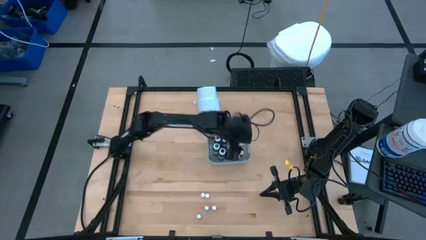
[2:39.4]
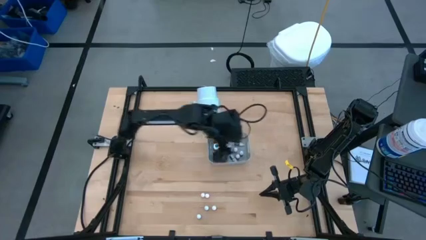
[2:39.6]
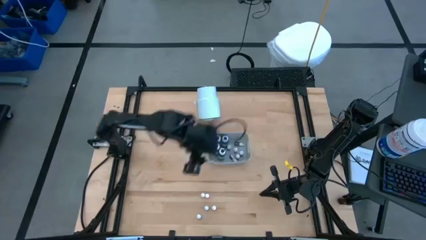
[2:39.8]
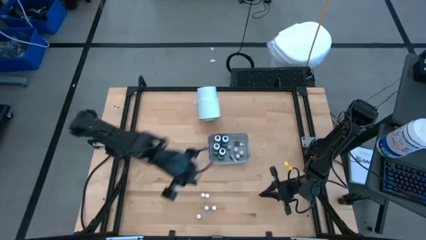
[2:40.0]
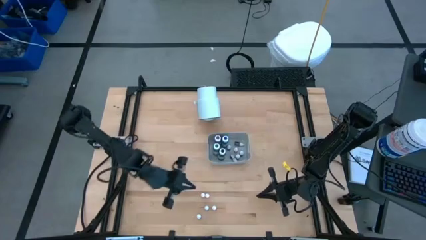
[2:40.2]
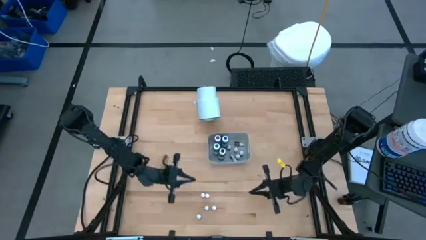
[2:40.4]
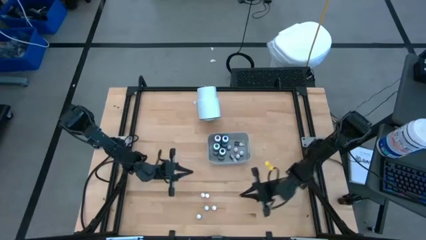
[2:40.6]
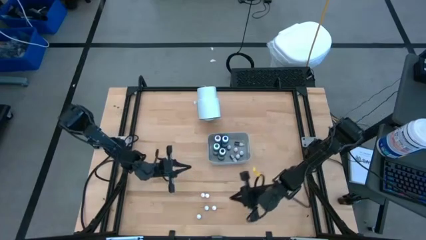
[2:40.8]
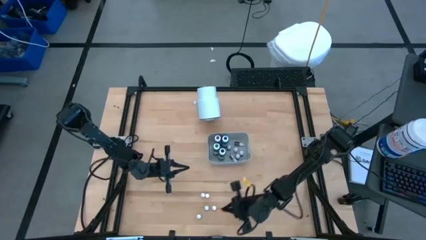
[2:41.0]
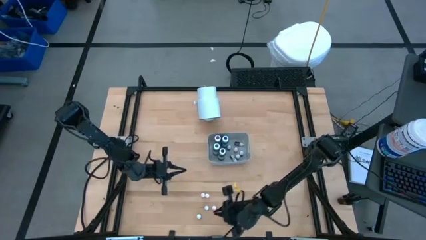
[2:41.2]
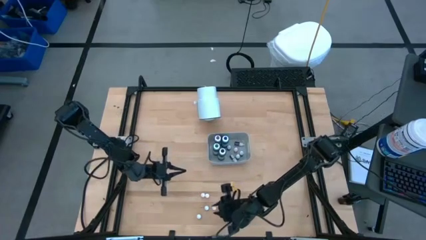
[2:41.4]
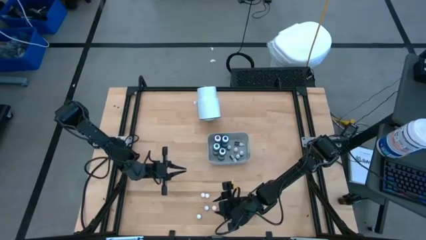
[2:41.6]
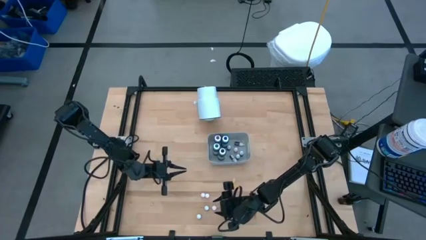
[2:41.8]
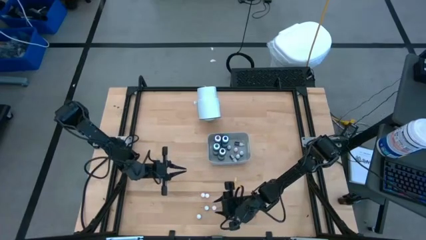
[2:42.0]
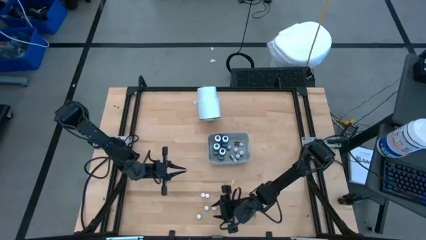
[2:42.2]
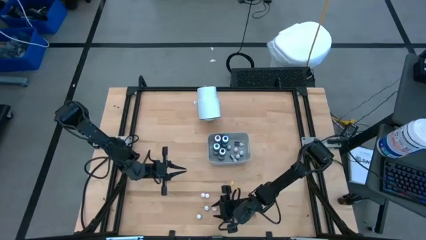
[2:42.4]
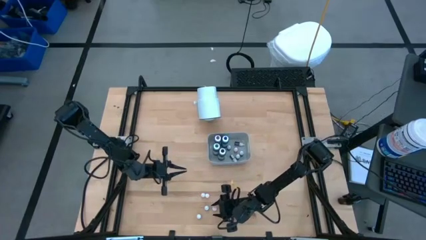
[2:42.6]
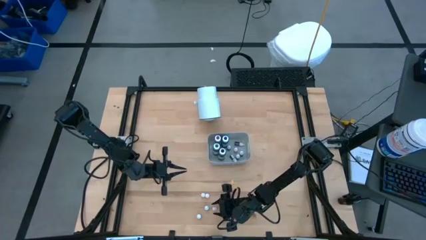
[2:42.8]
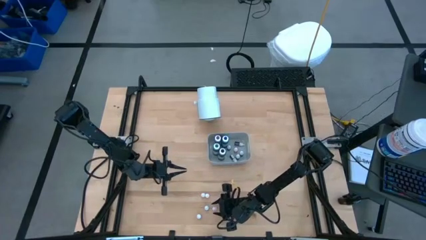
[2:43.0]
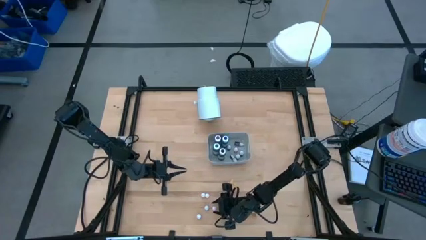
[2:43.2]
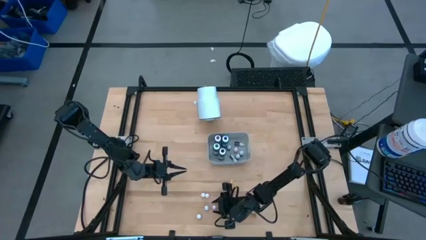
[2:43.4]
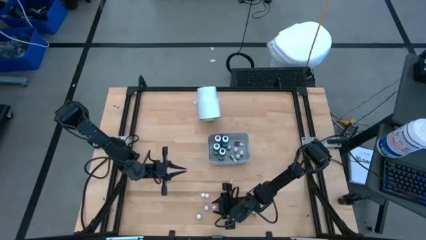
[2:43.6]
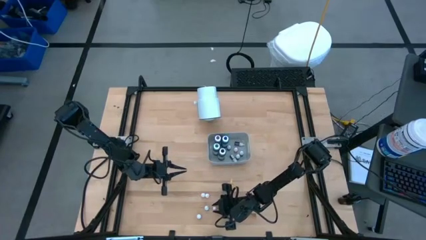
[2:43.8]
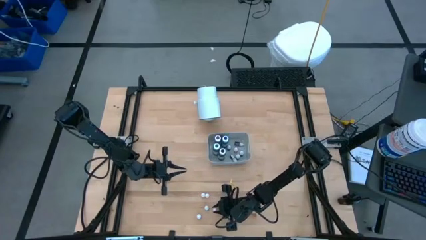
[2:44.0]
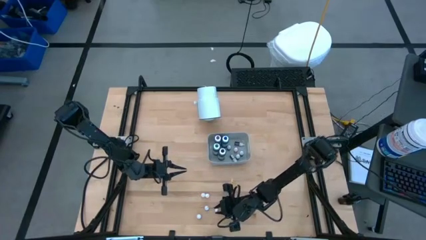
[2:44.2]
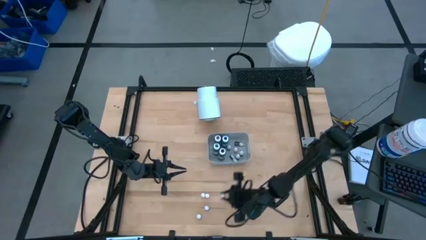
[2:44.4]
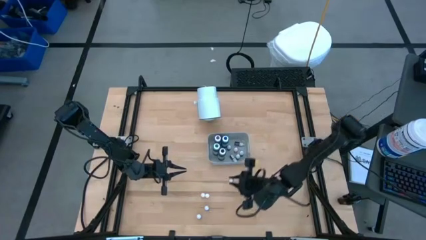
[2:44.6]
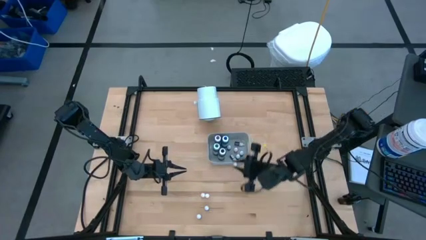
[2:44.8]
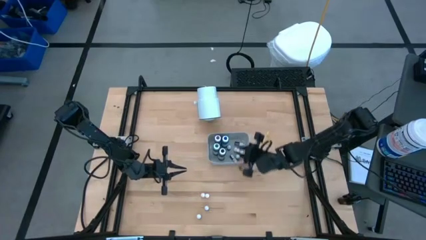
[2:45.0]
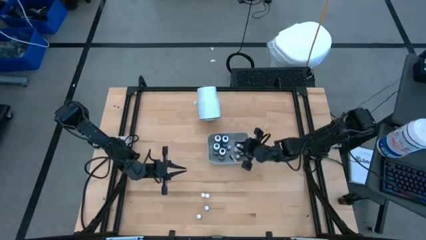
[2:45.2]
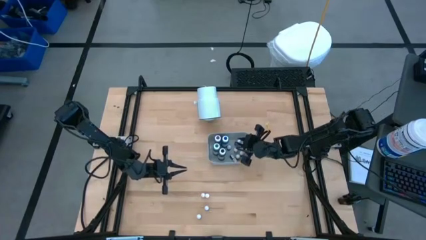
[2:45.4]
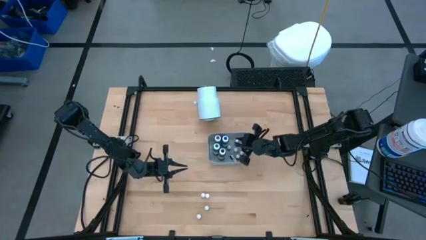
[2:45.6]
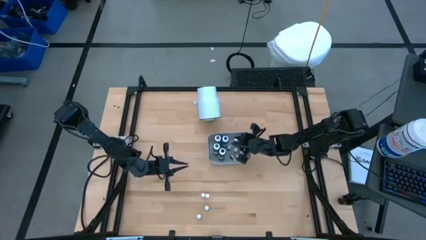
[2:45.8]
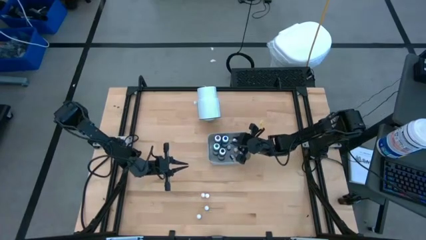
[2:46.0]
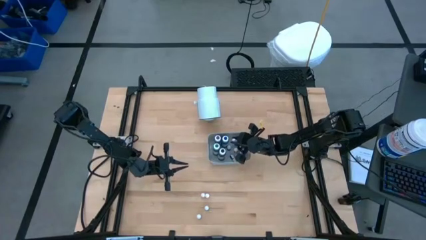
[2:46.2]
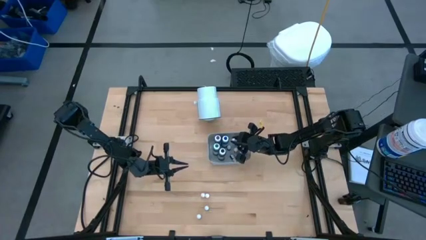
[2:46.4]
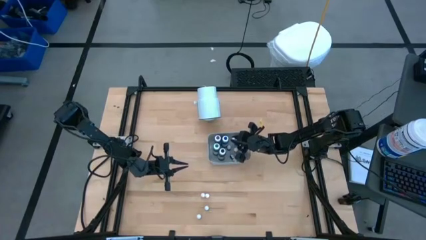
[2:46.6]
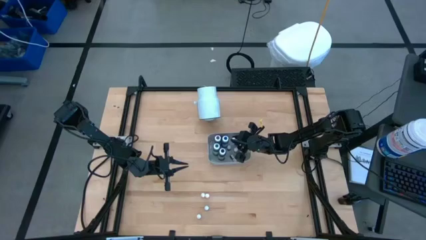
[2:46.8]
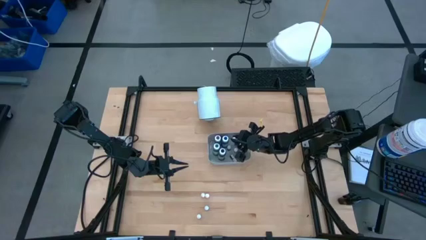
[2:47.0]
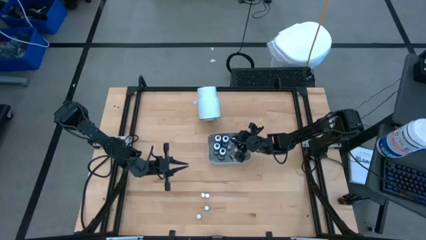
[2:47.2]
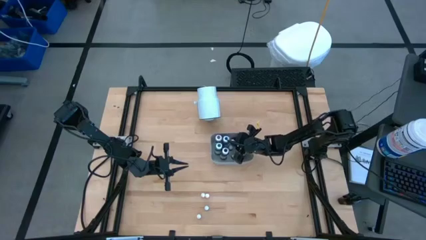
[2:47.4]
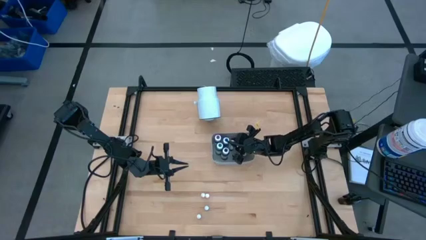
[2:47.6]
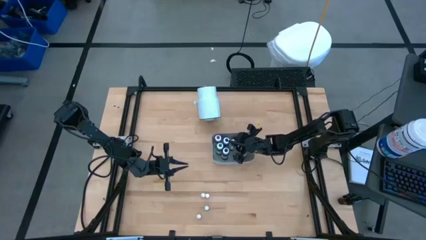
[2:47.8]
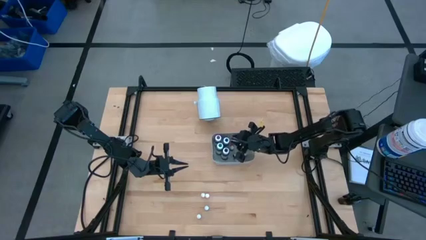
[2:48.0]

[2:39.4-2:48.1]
Task: Pick & Place food coloring
Put the orange food coloring bottle into the gray bin

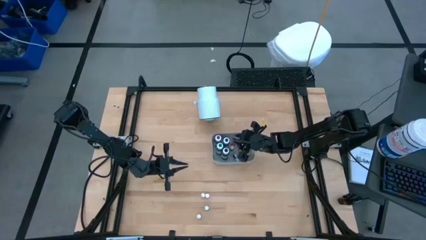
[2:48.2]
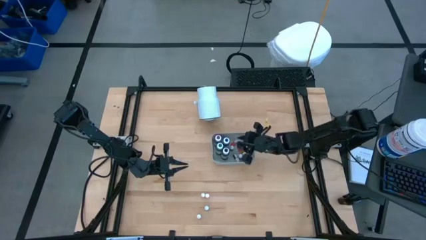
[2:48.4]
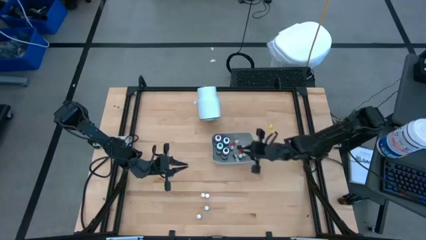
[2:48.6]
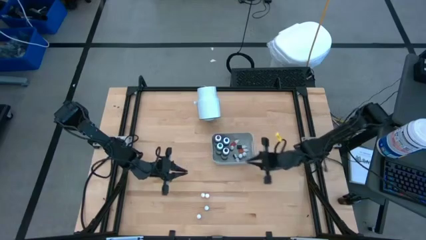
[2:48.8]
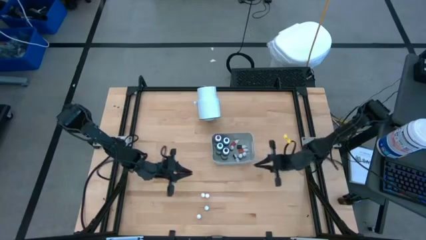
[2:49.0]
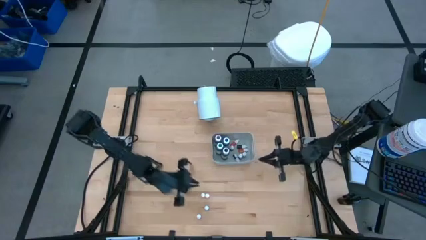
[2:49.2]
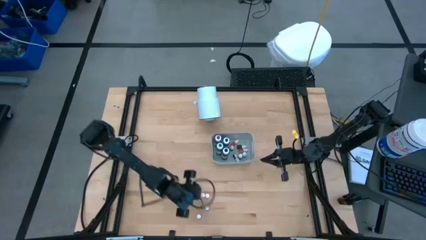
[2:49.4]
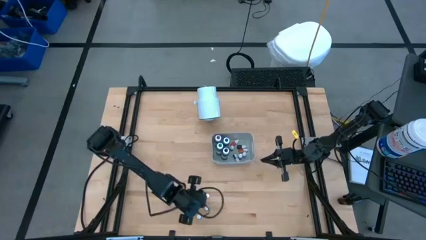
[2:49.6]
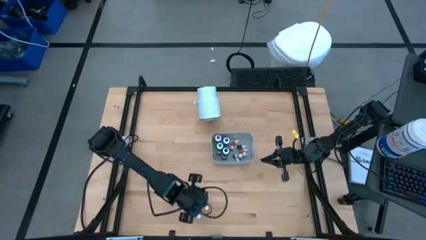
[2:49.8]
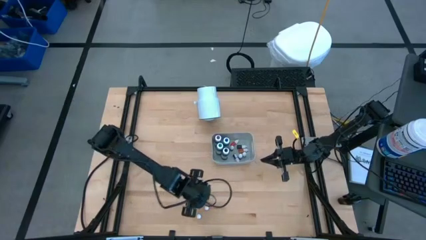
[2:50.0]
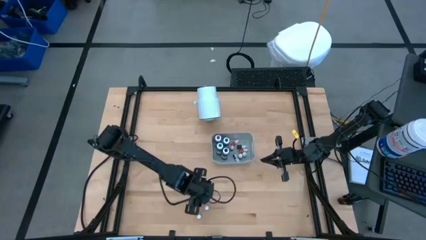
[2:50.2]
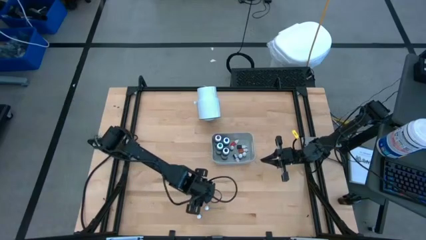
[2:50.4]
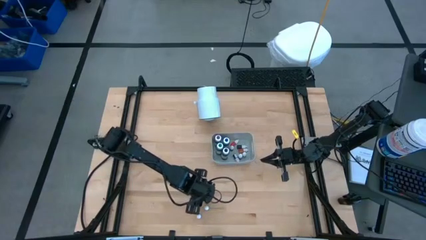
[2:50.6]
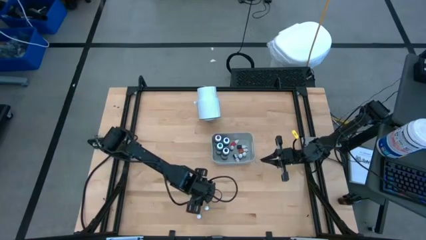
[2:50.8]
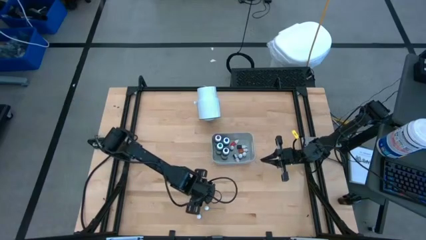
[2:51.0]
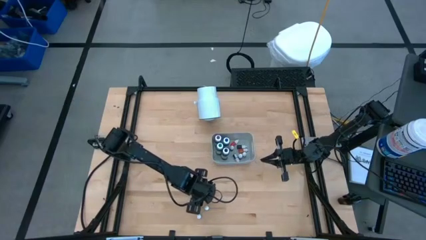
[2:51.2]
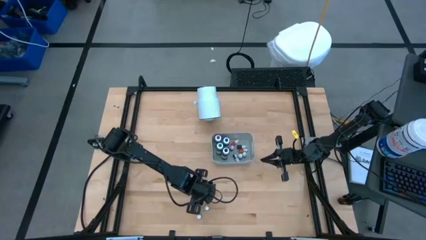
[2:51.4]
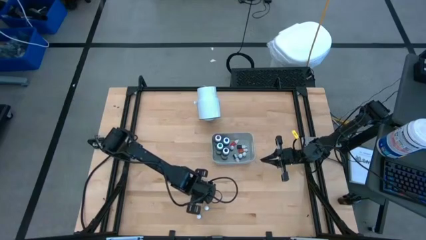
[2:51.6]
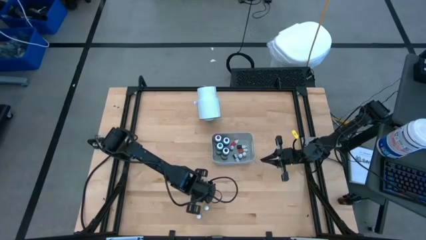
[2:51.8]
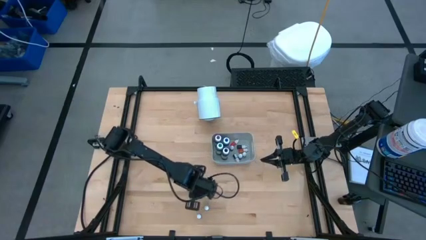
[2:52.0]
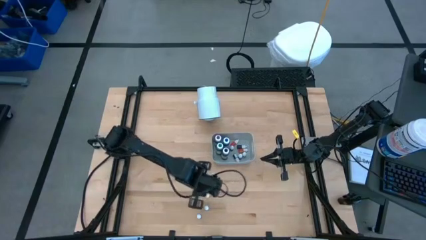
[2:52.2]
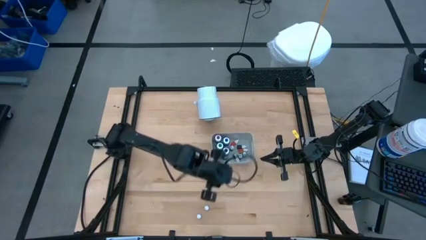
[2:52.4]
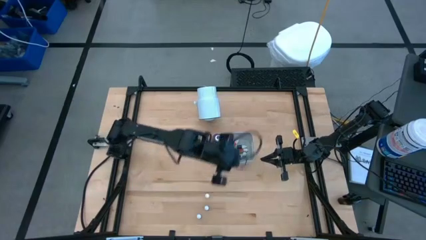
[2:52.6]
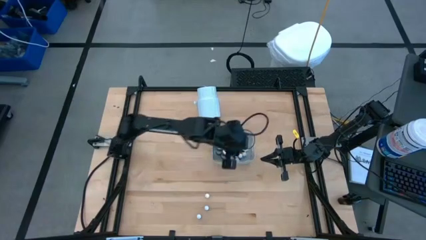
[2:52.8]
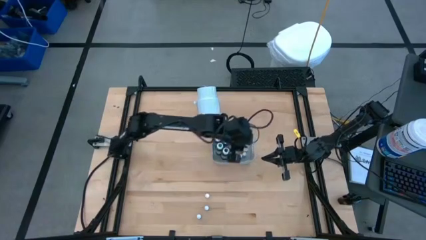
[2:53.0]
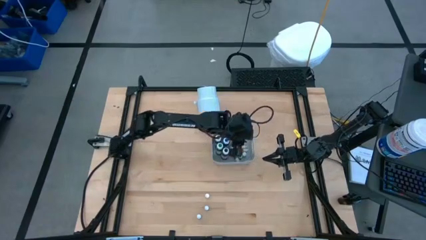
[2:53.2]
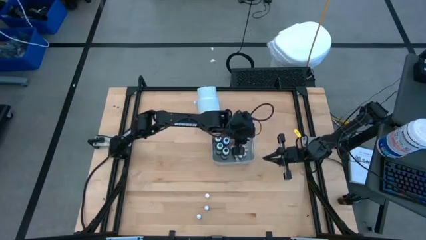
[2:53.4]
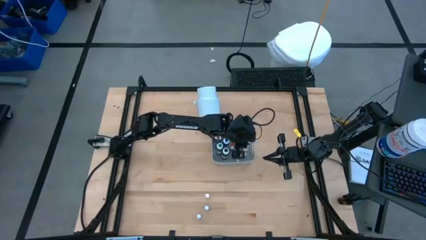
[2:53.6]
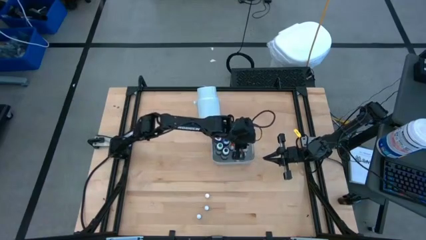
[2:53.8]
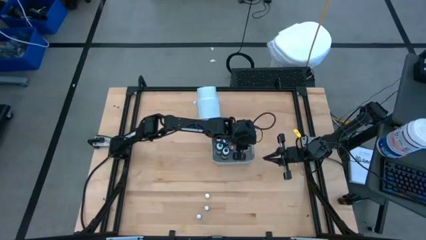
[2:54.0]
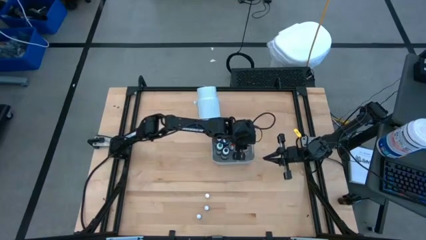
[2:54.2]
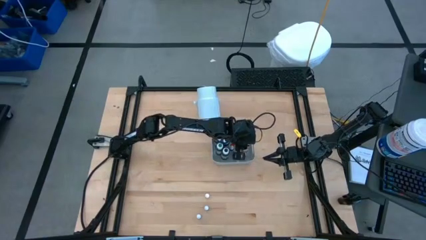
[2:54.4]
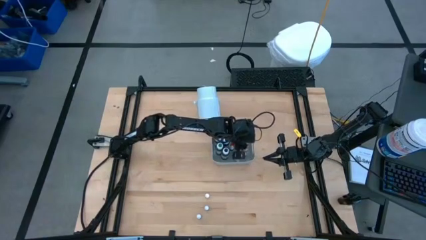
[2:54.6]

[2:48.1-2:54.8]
Put the orange food coloring bottle into the gray bin

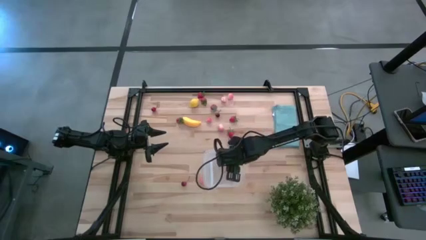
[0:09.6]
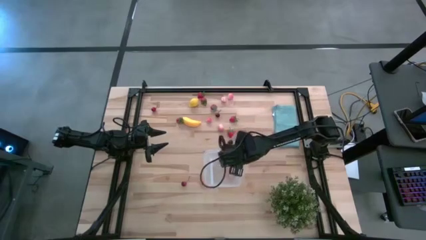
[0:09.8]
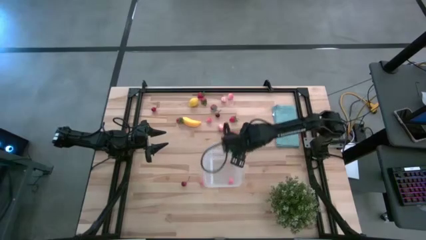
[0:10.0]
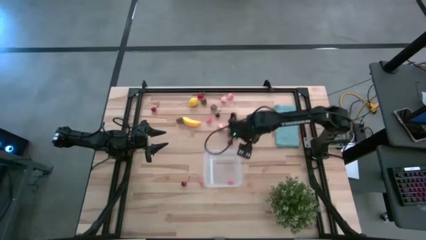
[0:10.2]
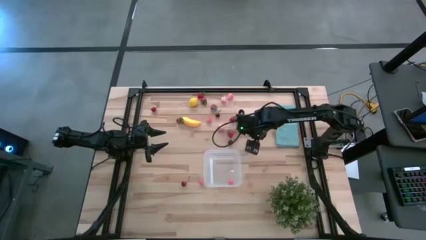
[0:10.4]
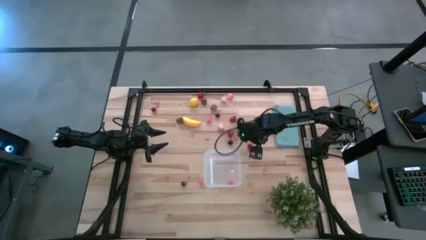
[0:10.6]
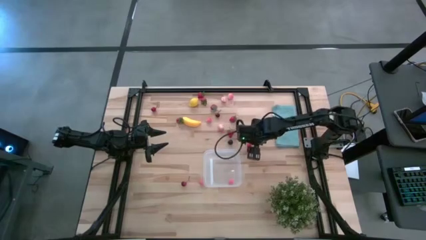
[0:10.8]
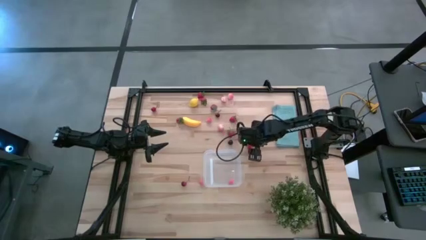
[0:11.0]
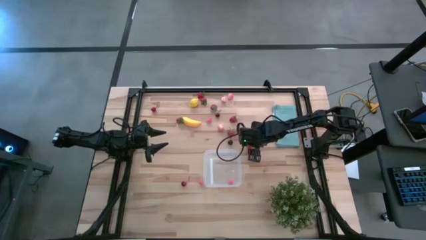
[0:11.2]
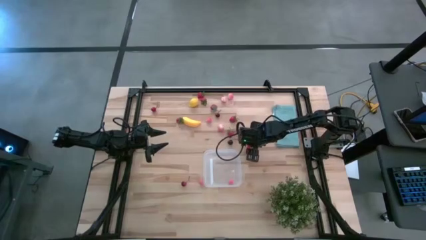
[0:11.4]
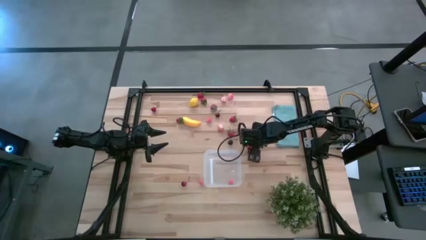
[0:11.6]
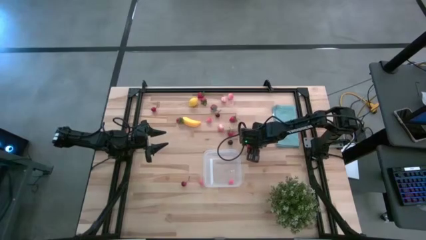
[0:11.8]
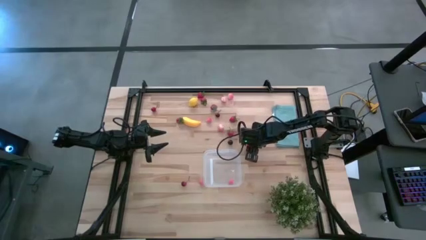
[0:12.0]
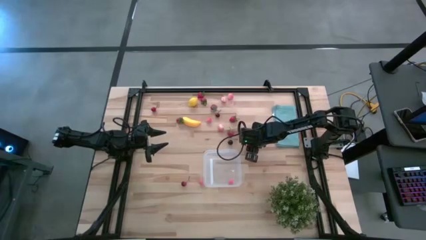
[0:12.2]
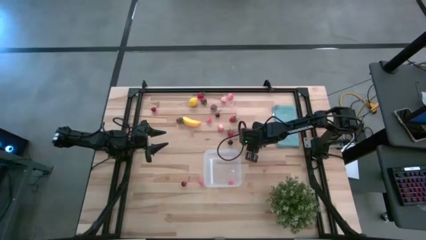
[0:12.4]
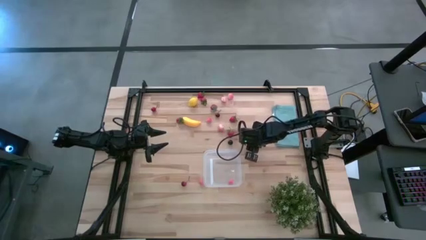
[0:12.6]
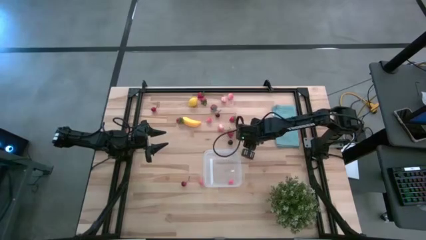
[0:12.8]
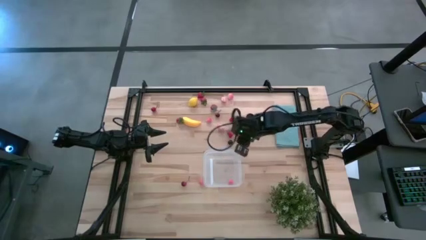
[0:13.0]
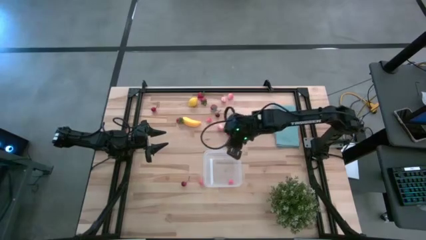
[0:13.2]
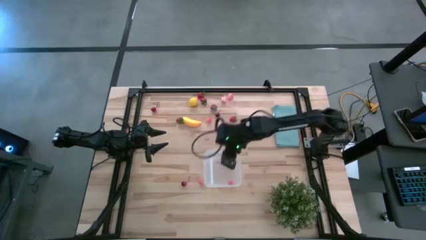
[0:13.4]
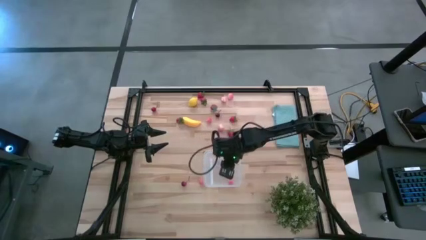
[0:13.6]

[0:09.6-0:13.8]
Task: Pick and placing Produce into tupperware
Put the red cherry into the transparent bin
